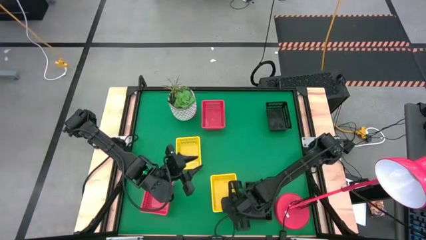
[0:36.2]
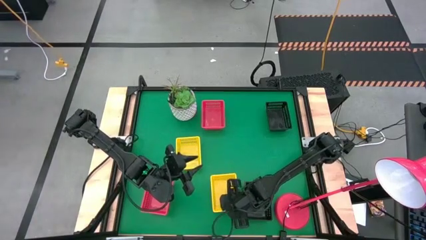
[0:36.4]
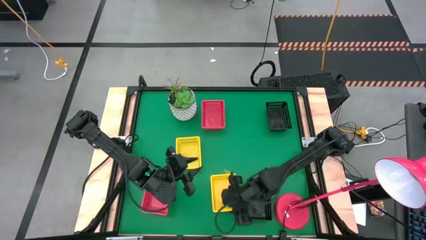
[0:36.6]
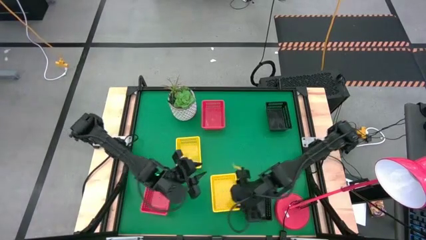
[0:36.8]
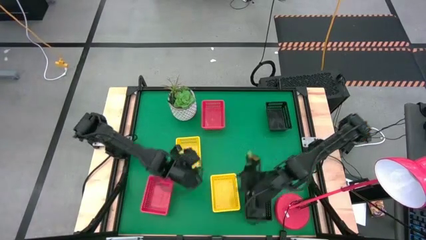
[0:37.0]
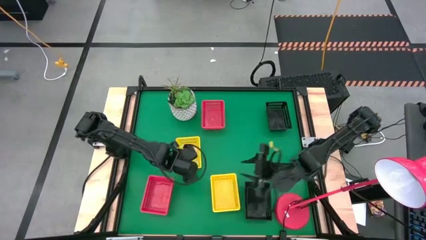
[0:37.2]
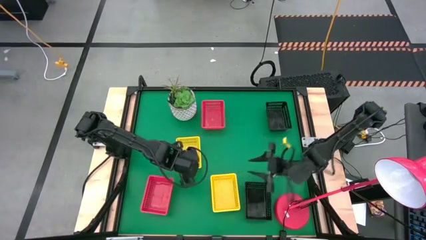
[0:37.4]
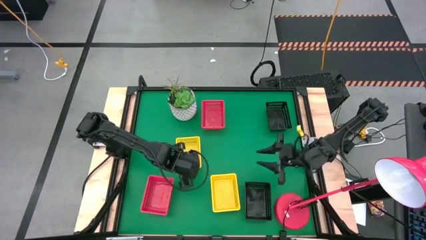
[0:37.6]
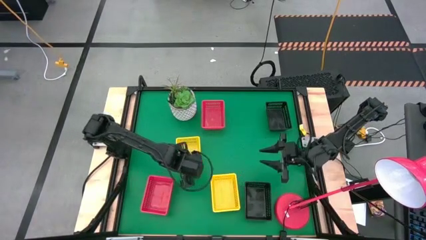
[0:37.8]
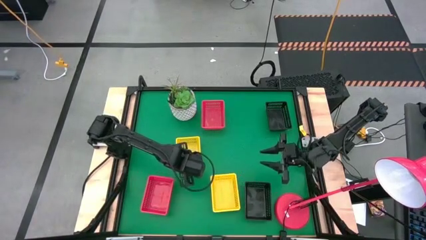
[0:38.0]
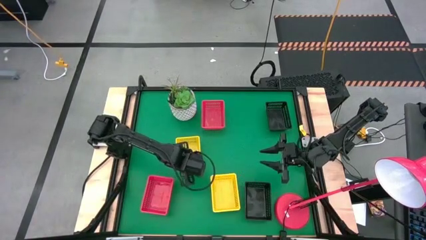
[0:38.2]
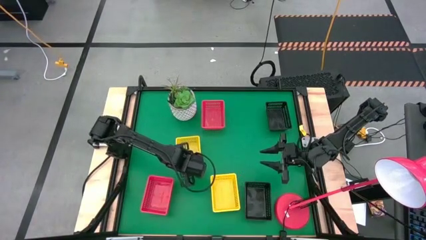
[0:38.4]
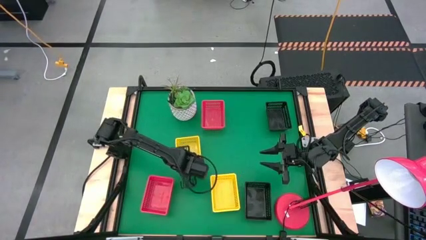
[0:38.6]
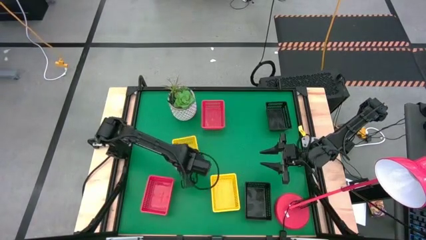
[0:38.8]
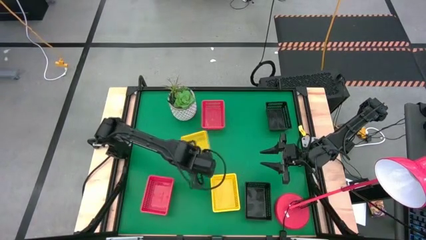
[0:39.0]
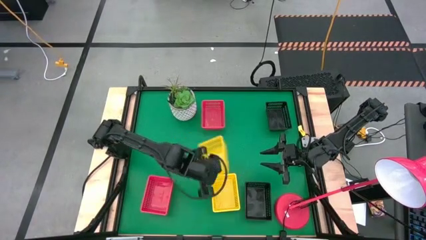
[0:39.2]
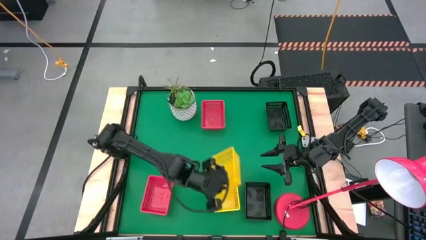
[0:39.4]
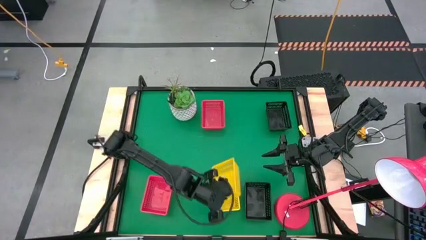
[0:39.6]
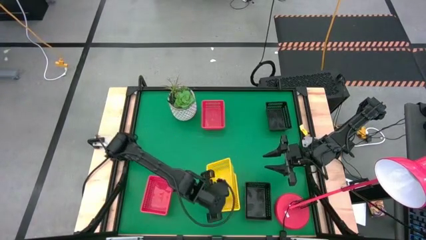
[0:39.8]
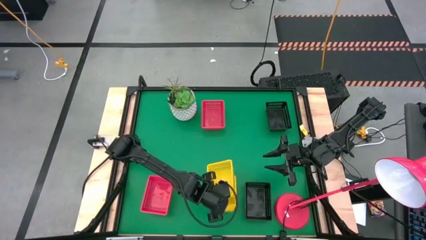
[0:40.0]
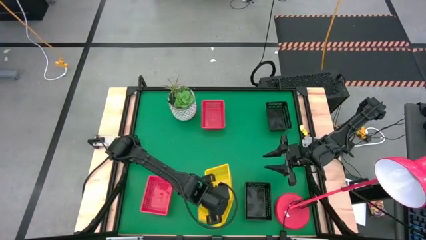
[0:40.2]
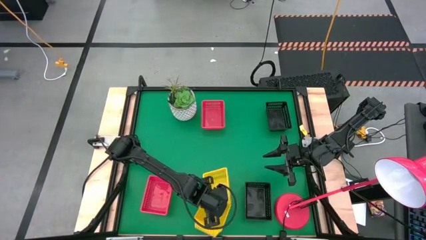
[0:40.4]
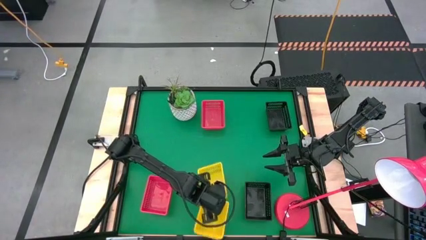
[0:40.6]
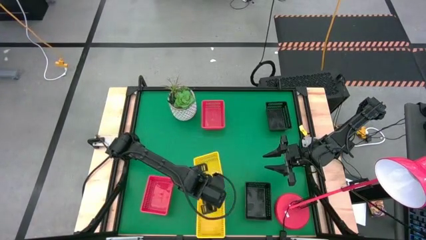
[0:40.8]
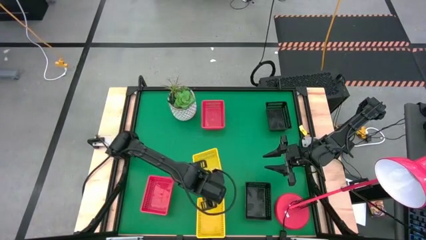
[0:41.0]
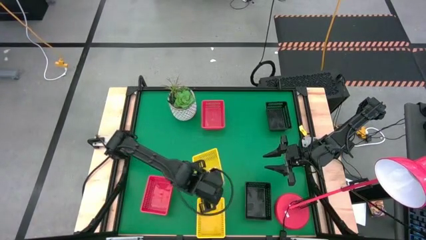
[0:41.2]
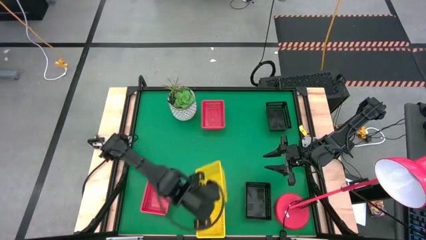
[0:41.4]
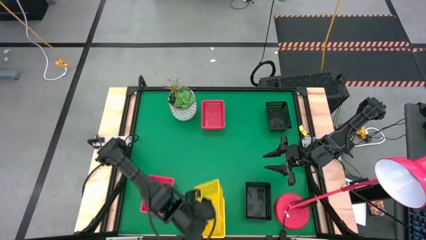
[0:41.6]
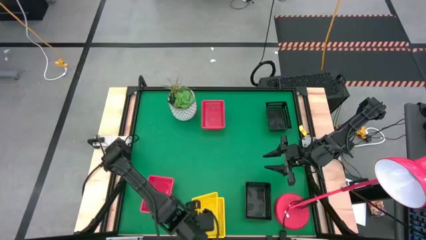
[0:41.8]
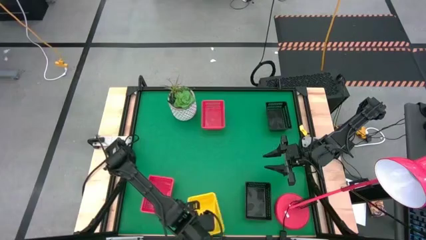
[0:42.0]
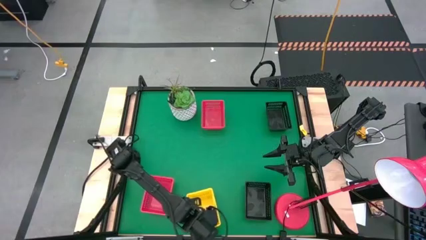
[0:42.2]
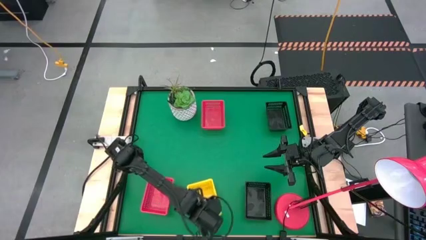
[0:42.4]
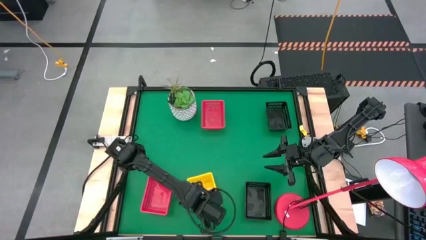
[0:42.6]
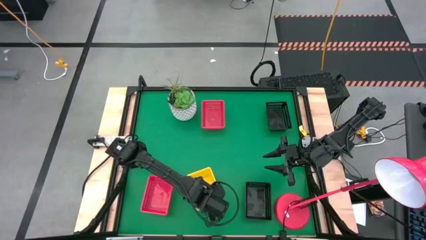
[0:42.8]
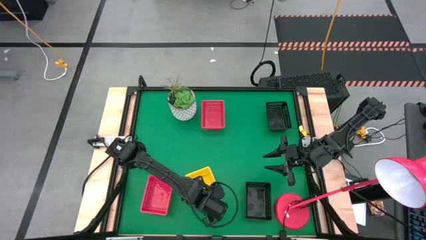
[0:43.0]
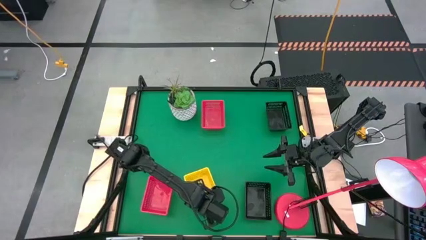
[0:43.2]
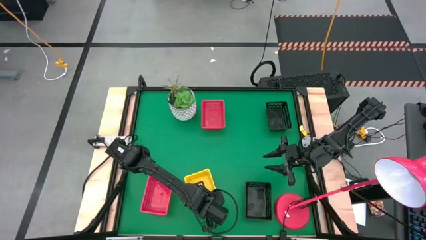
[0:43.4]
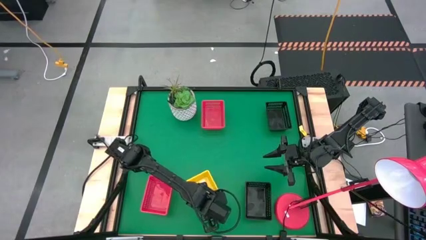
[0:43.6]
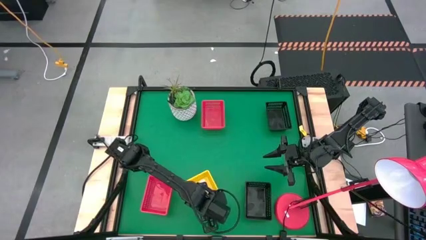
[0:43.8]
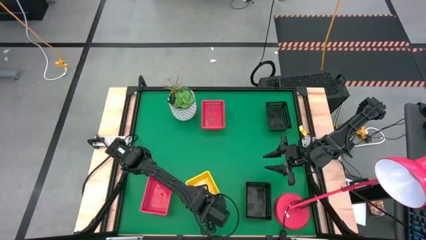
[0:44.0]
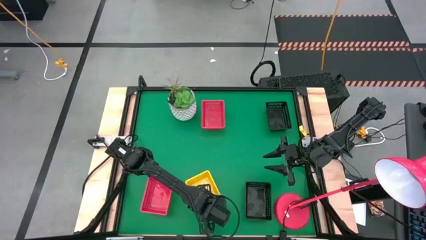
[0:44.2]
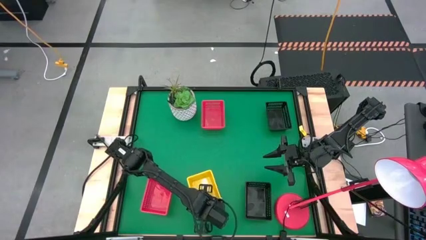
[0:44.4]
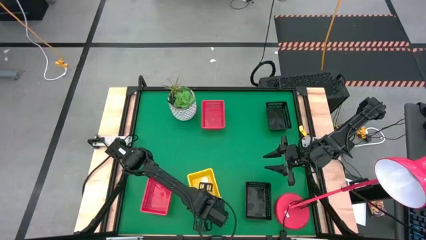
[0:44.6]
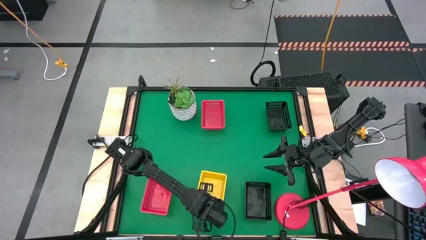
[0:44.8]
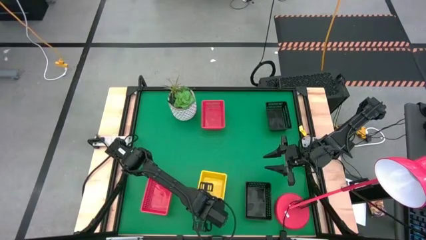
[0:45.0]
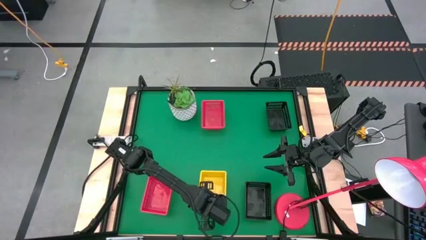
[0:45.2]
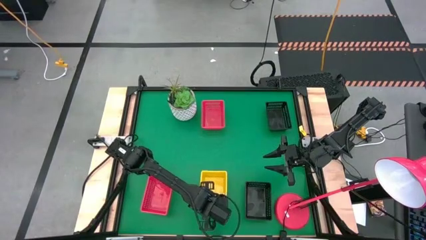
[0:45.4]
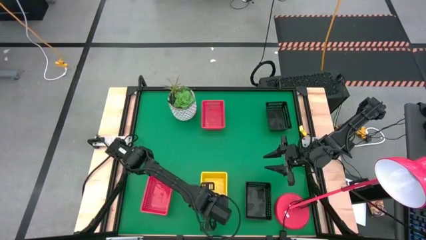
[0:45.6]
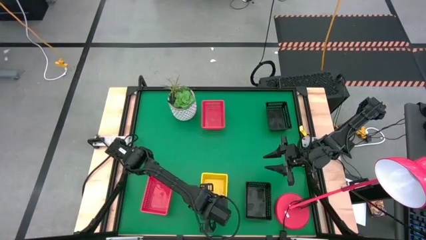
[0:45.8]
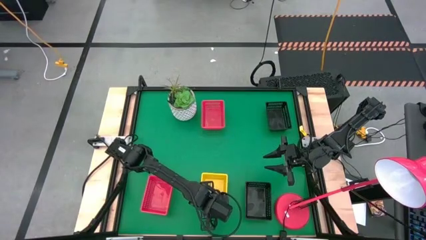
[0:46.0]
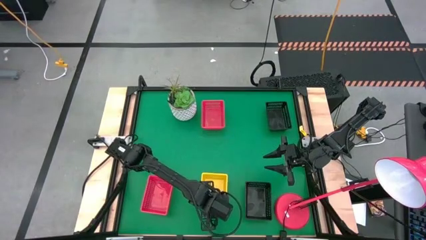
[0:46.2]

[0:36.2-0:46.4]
Stack the top yellow bin on top of the bottom yellow bin

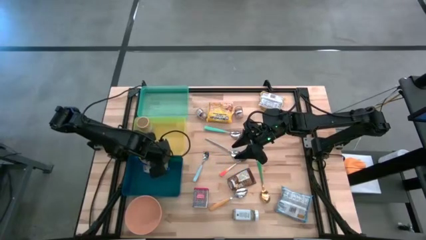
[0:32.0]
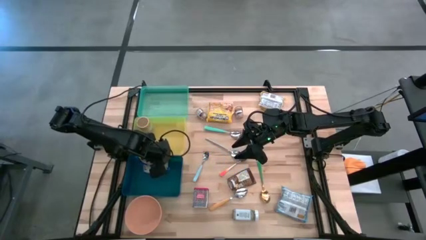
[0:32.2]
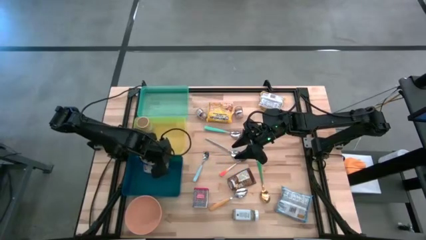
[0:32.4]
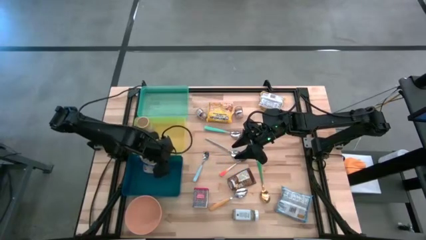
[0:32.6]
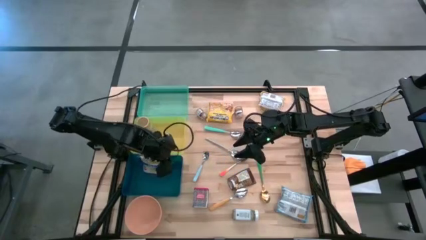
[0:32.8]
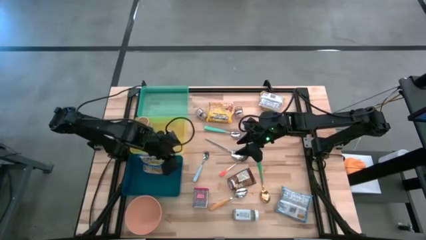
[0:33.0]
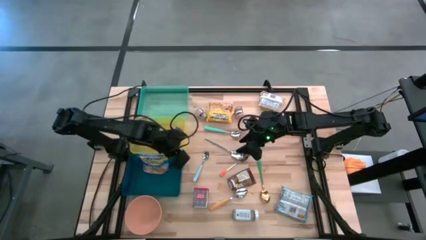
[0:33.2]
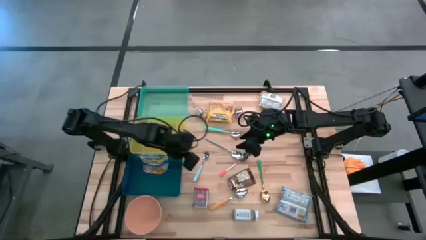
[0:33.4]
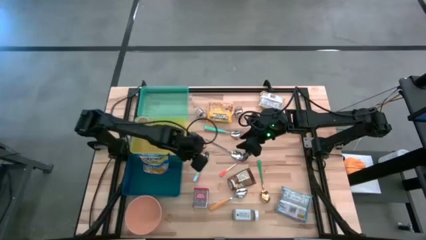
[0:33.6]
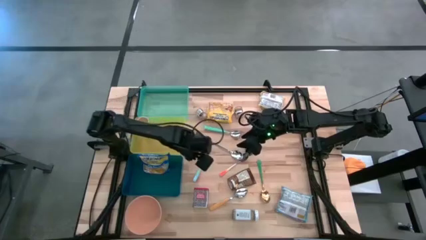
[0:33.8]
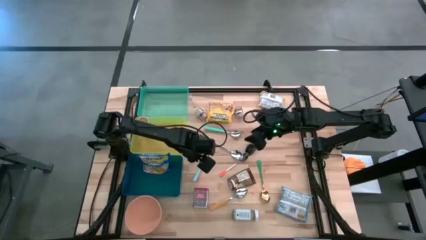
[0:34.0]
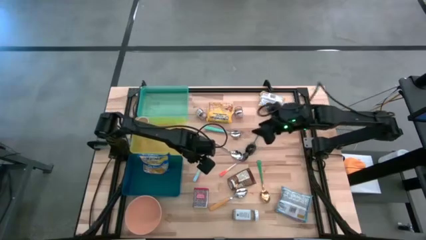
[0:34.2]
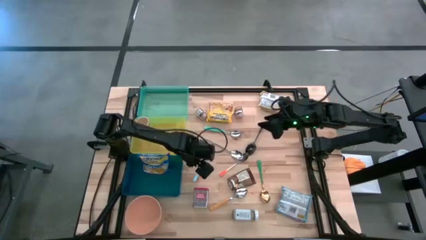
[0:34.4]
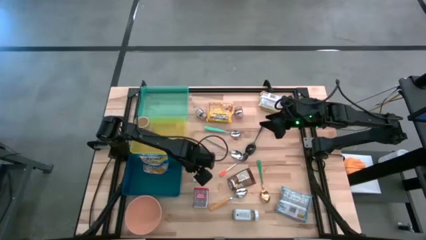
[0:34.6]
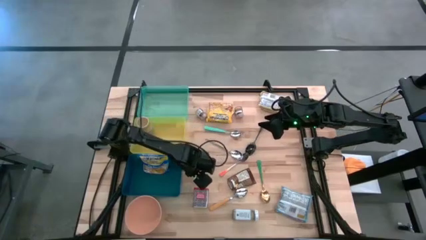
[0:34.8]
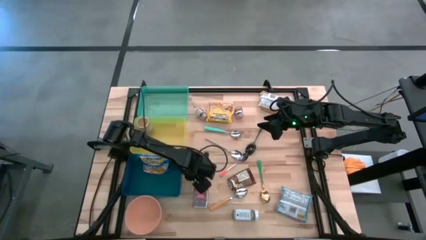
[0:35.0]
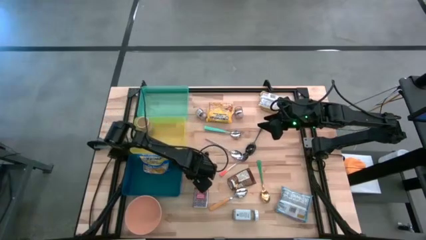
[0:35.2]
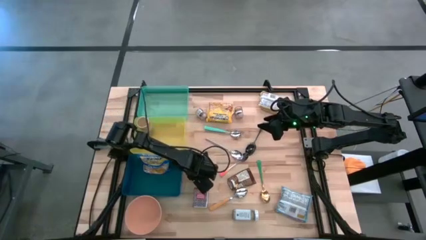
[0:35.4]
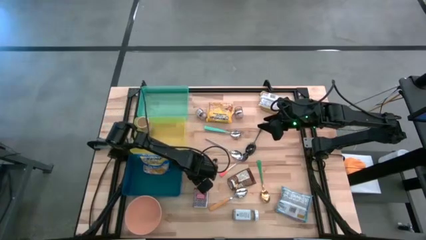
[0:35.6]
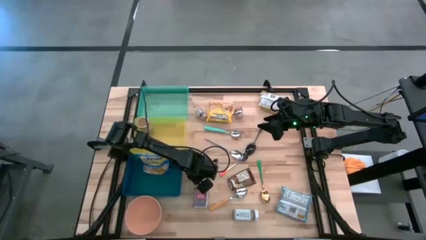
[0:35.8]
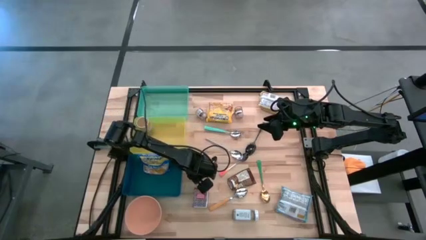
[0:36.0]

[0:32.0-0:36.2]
Put the blue spoon into the green bin
